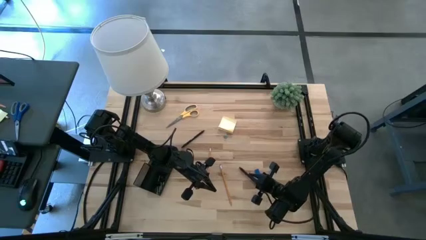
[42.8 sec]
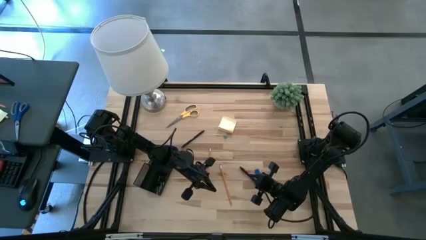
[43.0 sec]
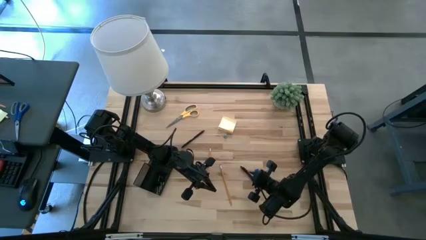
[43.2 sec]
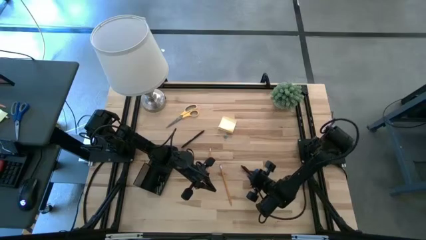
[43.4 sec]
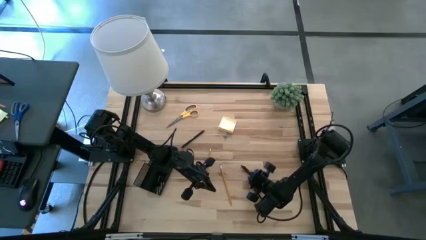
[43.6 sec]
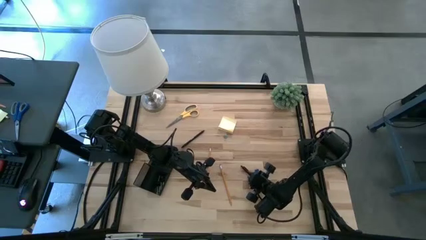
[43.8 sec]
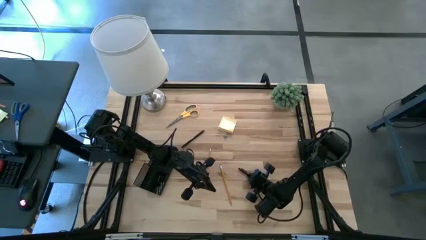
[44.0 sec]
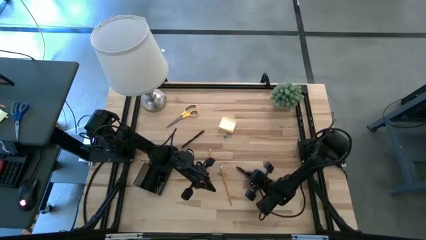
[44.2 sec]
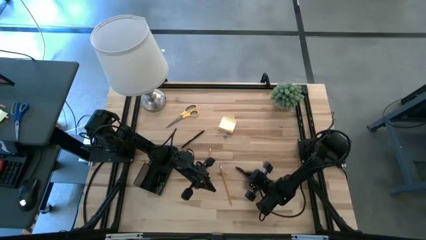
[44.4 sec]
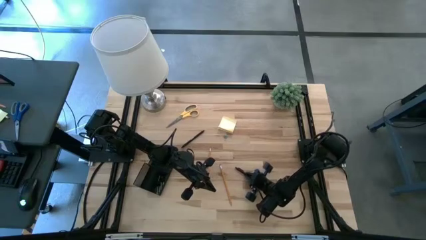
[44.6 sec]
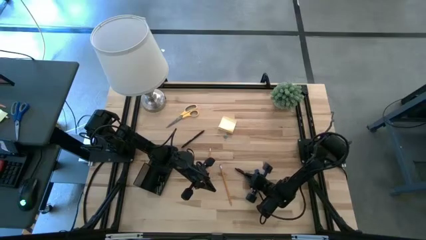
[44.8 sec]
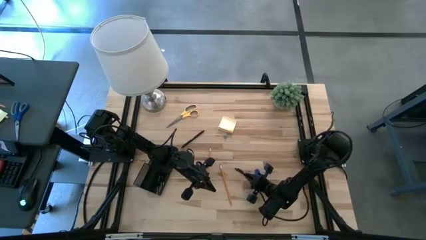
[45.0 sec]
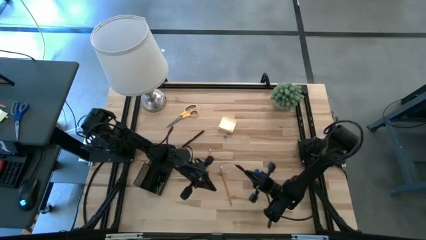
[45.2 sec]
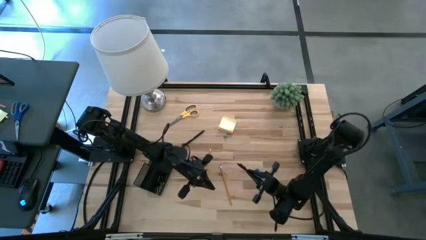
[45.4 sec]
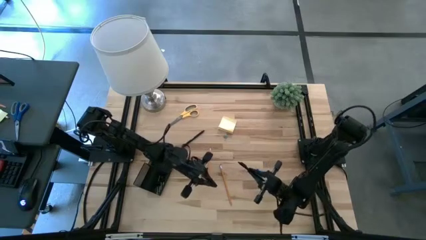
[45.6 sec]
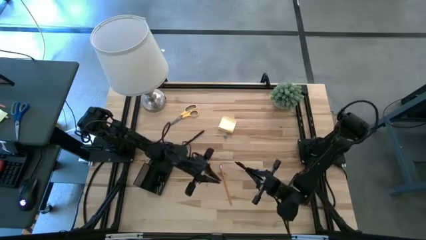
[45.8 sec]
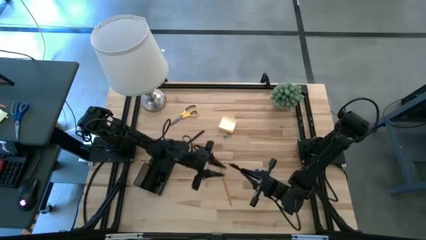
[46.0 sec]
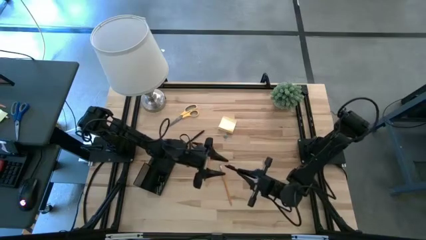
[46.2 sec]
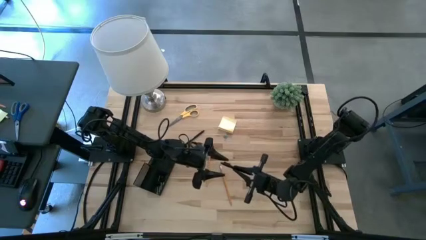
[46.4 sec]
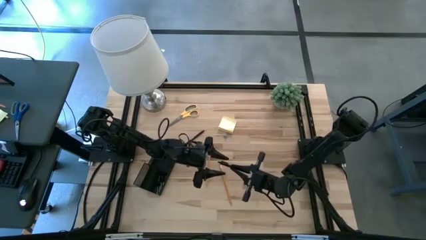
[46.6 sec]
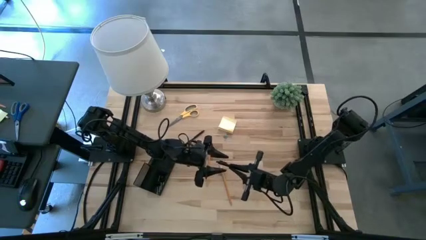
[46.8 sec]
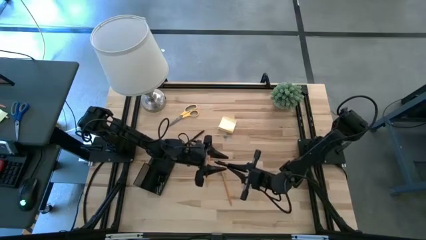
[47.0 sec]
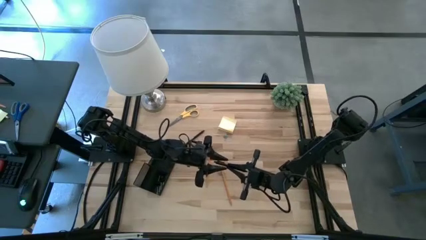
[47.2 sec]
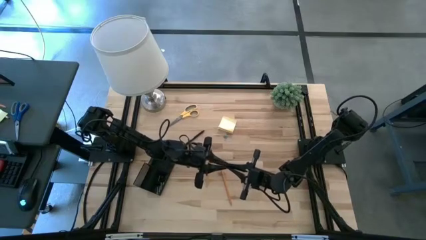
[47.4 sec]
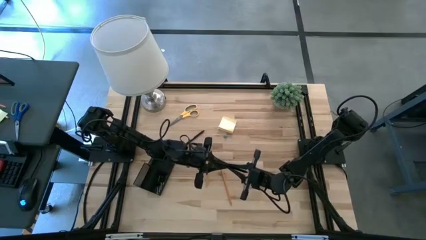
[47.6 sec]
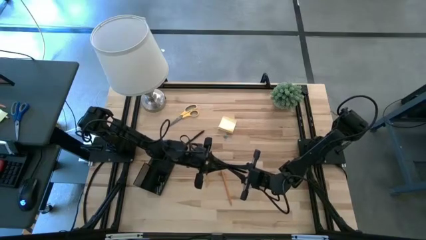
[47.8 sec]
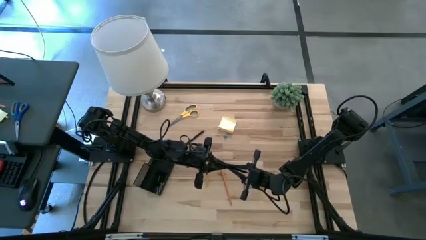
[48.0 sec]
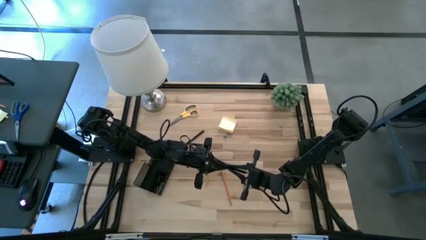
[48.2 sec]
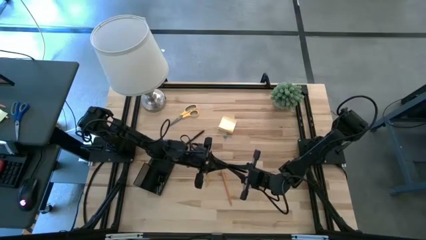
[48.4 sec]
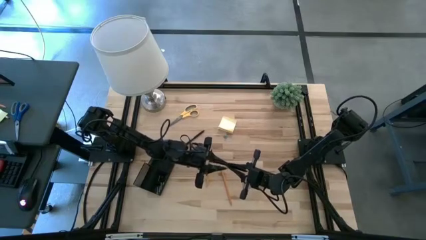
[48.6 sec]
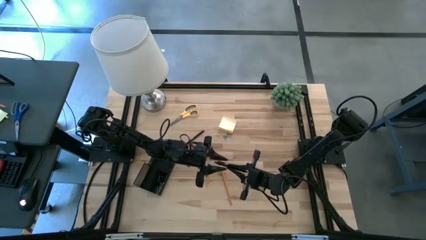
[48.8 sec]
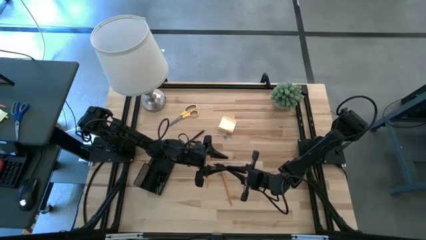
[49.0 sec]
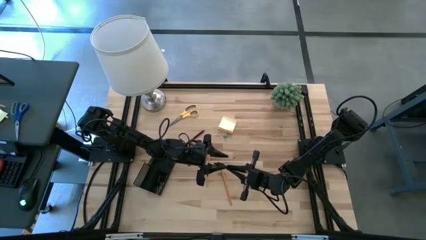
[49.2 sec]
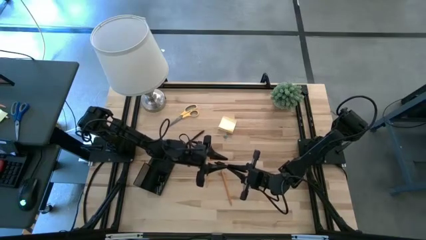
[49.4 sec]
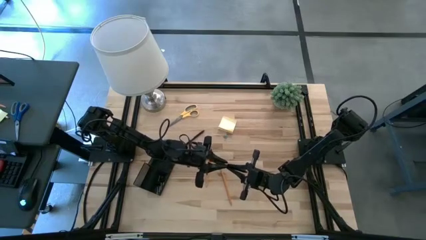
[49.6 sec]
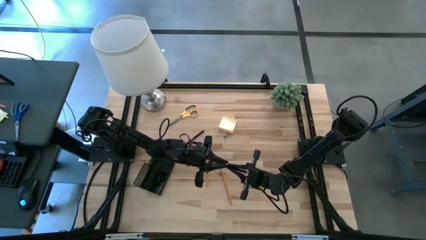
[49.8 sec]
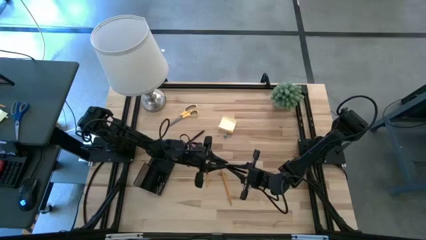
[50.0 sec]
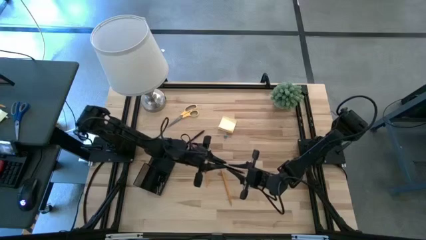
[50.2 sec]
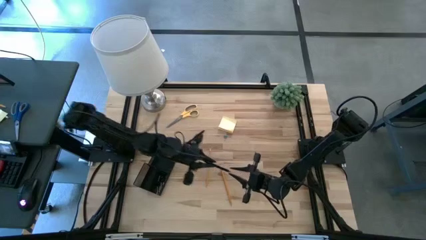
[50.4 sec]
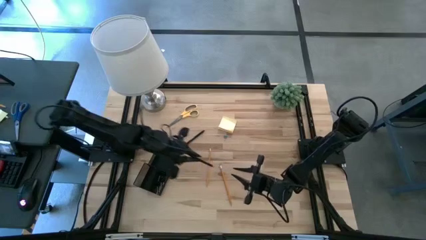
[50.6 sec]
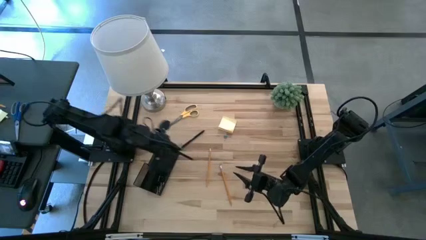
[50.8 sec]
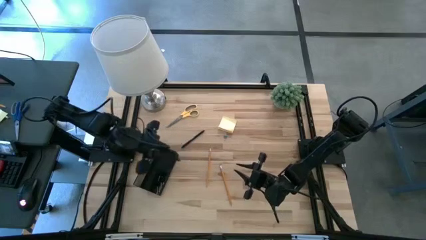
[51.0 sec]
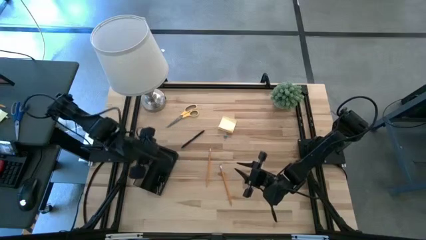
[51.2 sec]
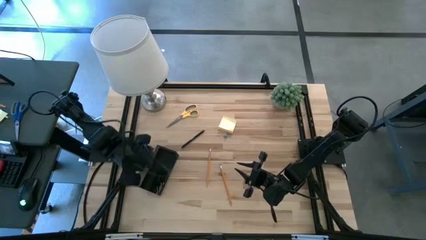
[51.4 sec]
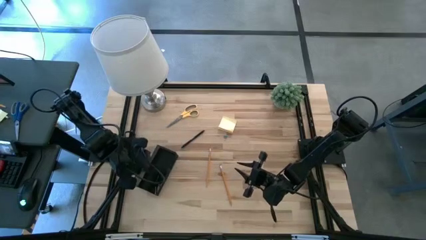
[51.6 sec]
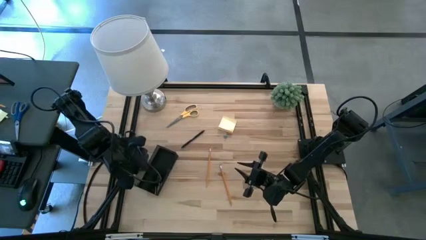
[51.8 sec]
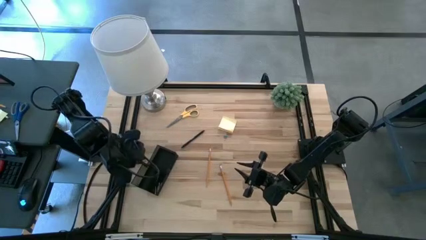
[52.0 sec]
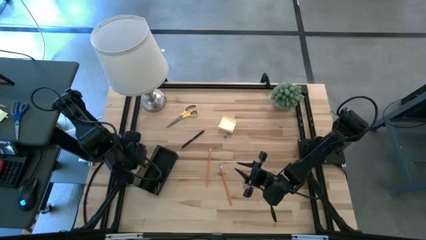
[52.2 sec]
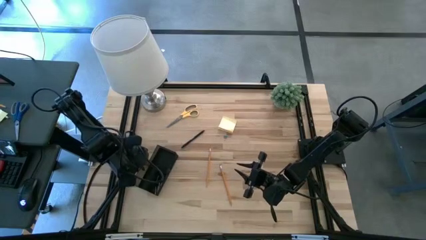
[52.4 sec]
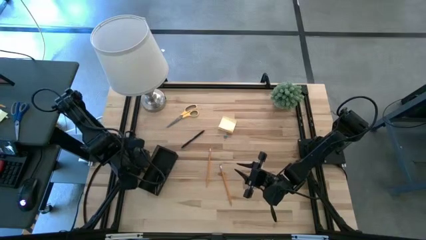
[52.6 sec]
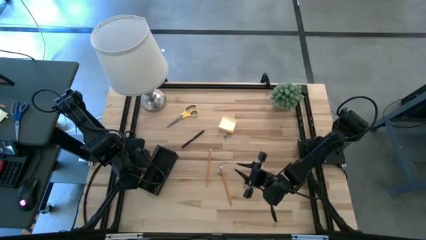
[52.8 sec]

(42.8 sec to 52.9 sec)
Task: Pick and place office supplies into organizer
Put the bottom black pen into the black desk organizer

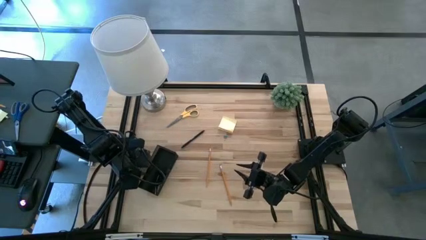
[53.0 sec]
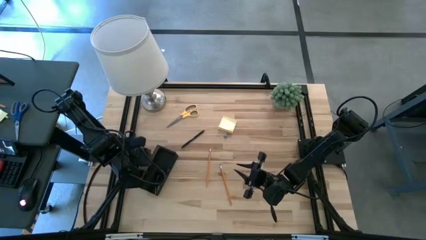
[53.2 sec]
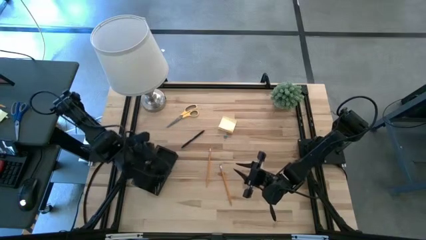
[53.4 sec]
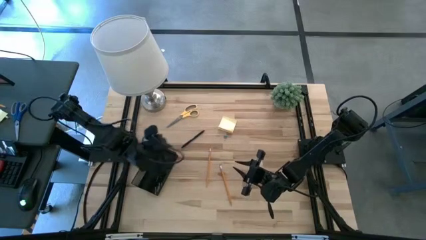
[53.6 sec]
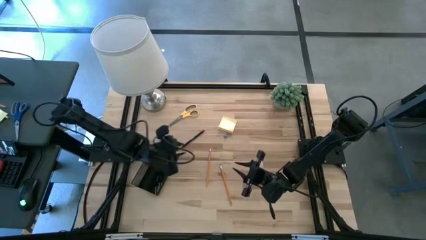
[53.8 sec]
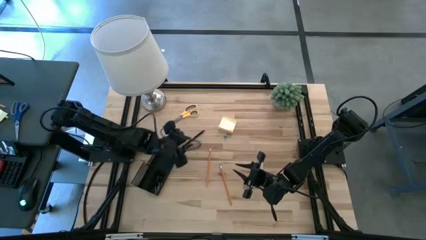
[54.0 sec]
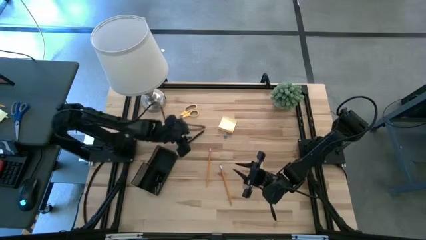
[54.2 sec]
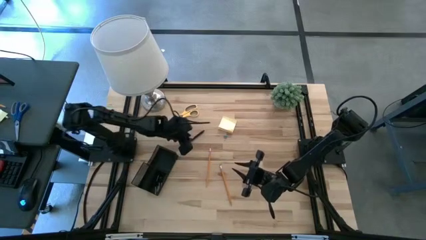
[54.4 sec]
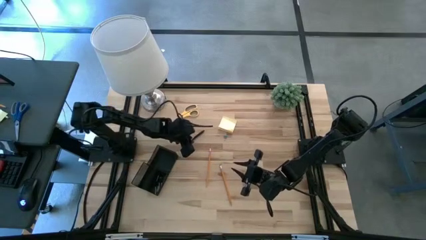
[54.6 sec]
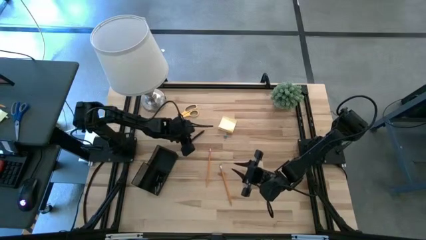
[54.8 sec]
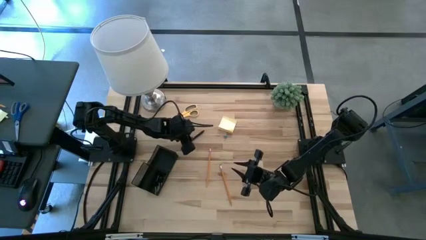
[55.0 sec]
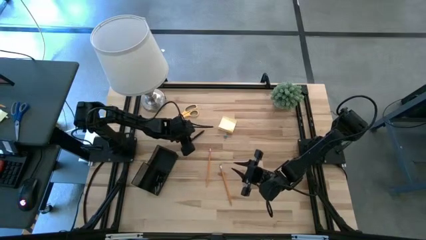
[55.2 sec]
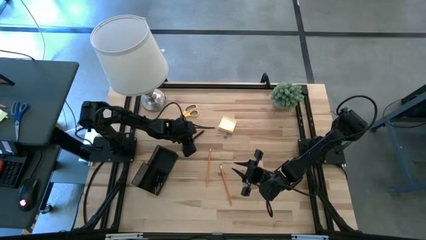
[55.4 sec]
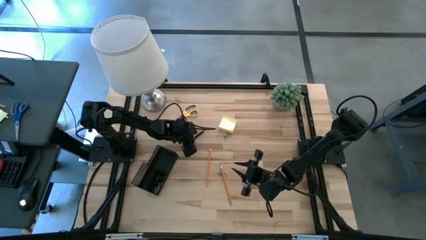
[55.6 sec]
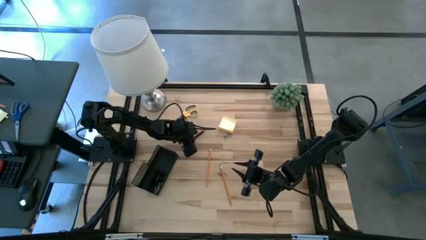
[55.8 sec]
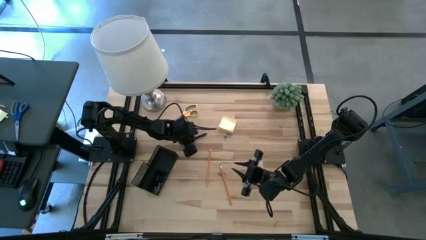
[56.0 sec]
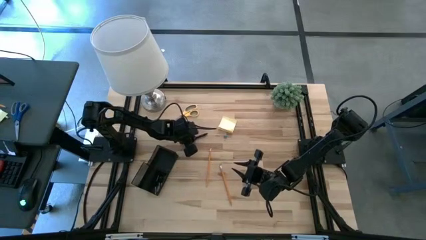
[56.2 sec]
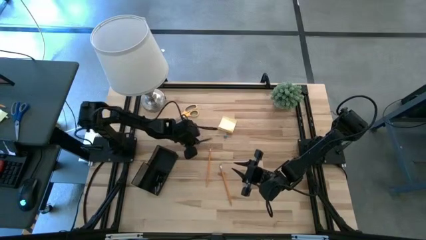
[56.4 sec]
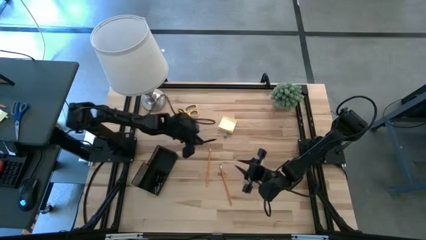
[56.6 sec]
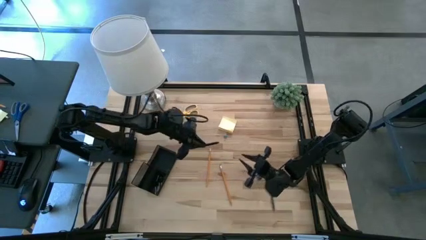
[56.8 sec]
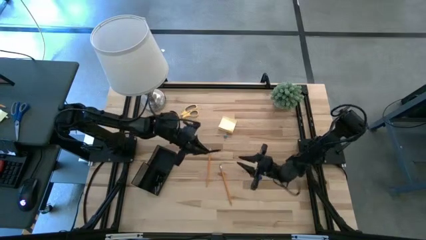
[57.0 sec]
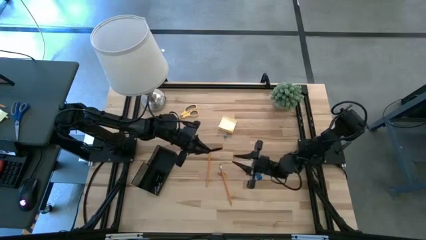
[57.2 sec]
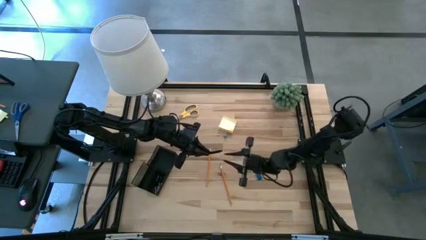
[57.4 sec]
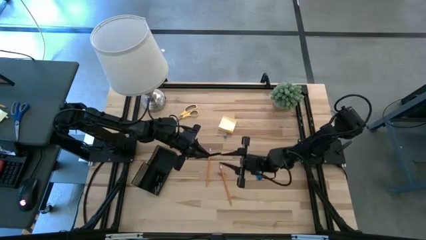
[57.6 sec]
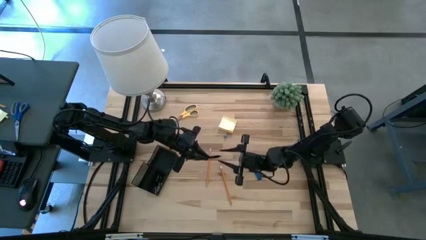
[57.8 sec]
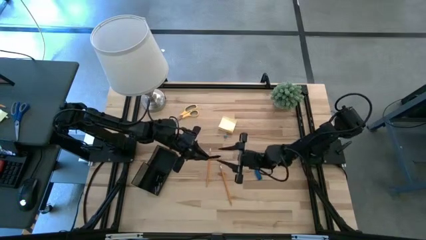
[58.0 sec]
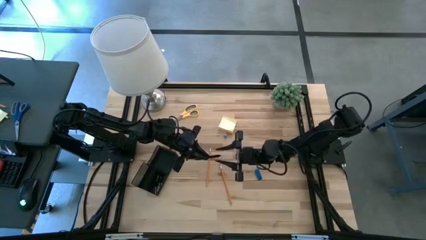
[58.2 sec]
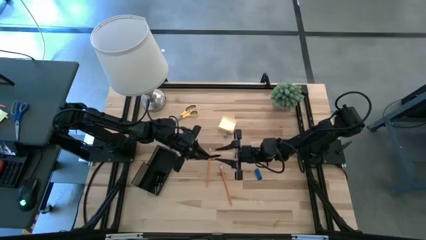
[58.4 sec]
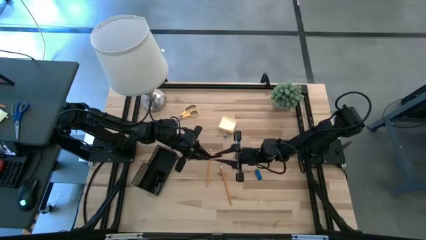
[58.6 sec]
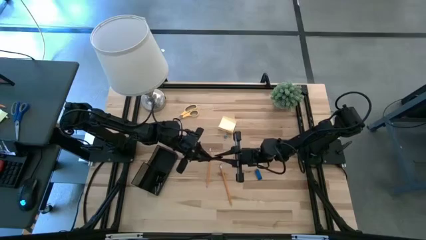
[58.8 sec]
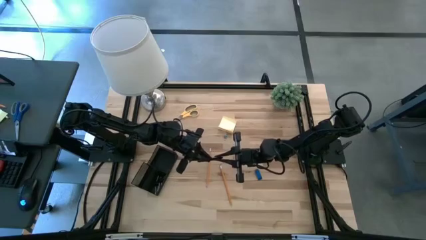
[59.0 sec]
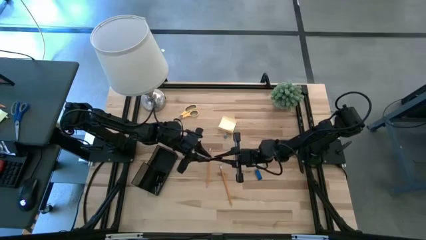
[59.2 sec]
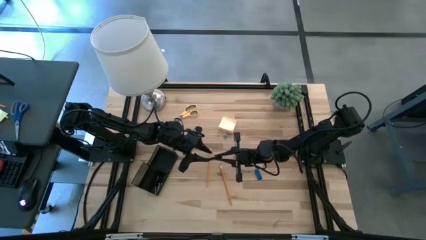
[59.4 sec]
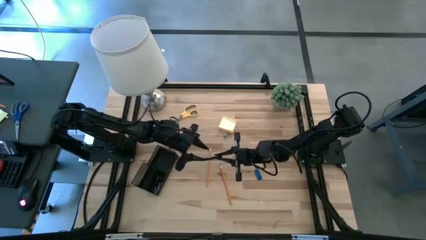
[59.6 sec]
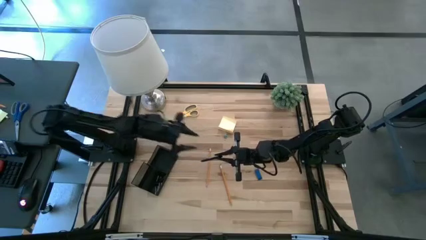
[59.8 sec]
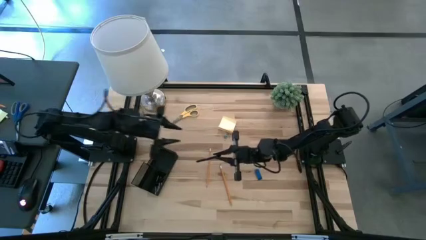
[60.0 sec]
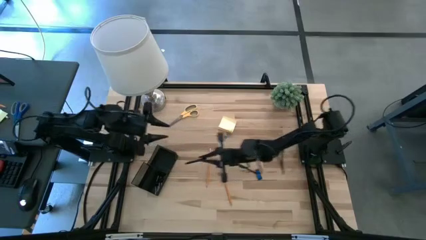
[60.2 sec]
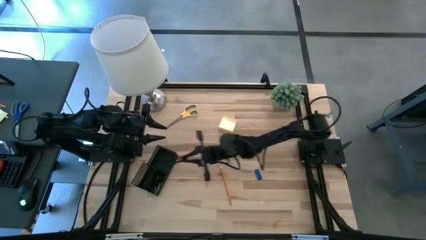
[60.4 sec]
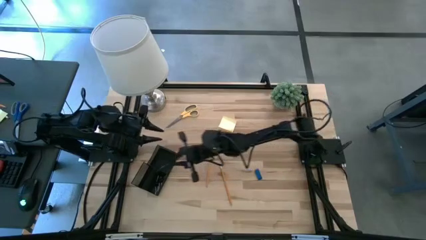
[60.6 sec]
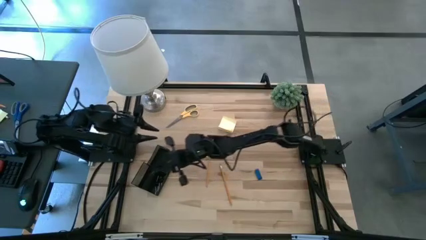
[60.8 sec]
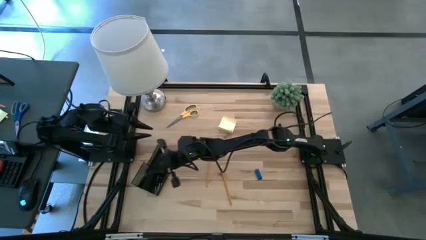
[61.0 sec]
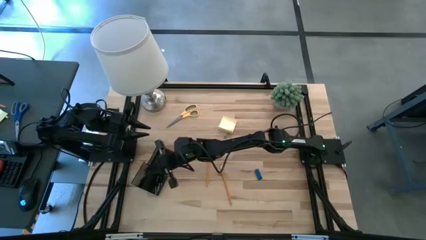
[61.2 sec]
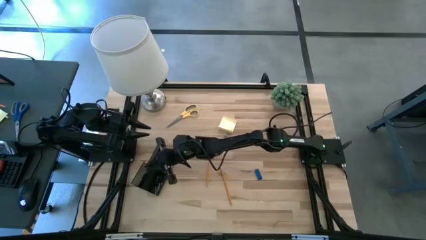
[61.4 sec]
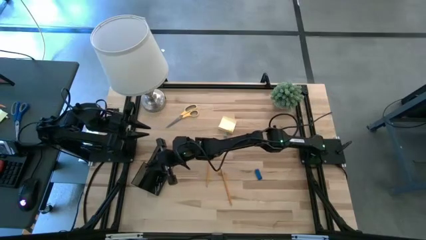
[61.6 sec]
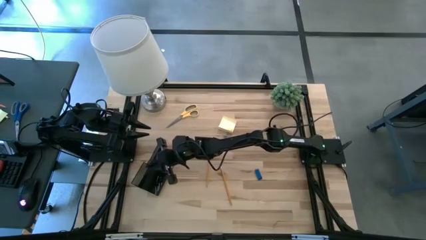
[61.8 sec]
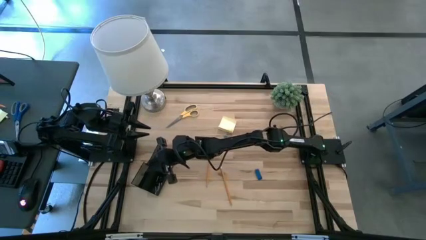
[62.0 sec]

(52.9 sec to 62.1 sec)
Put the black pen into the black desk organizer
